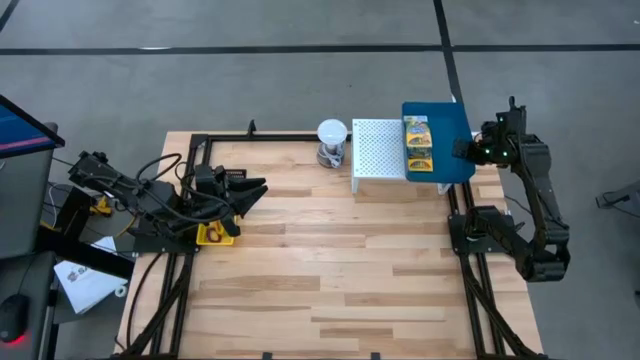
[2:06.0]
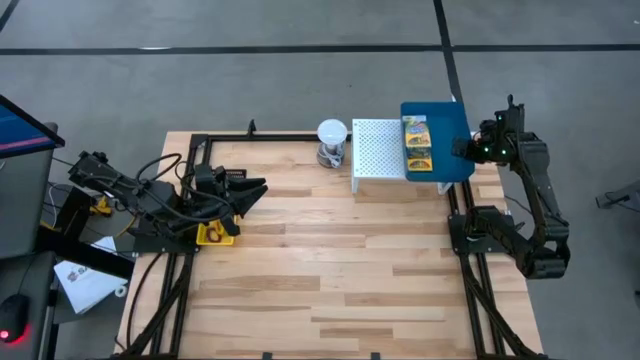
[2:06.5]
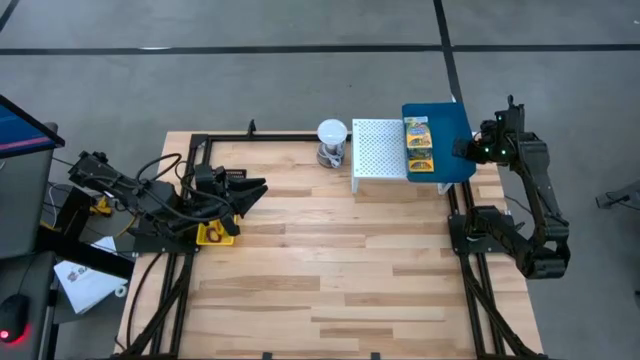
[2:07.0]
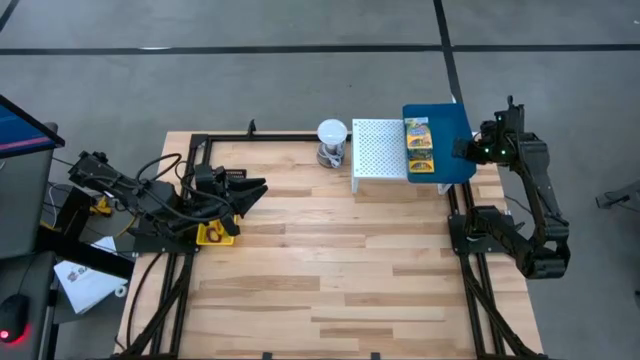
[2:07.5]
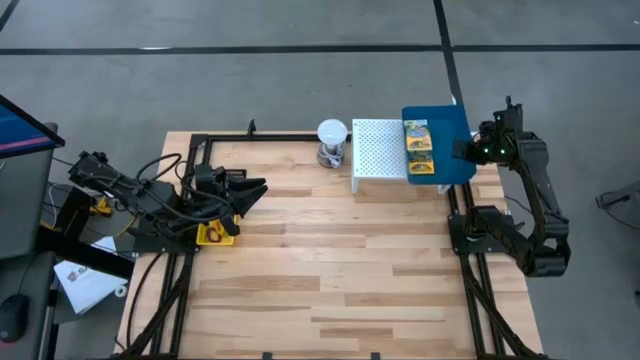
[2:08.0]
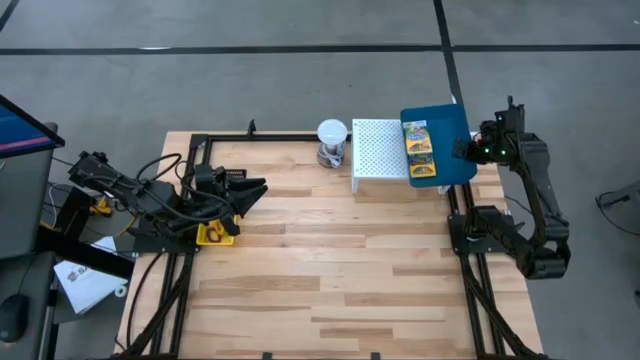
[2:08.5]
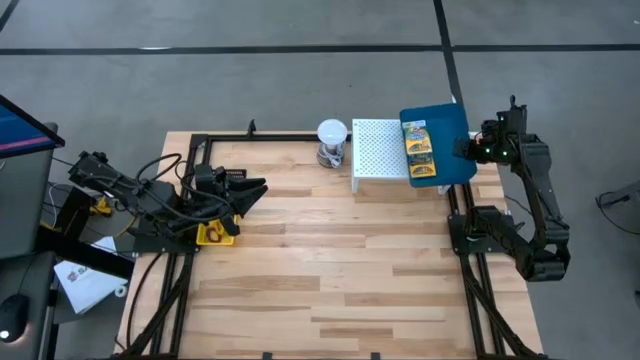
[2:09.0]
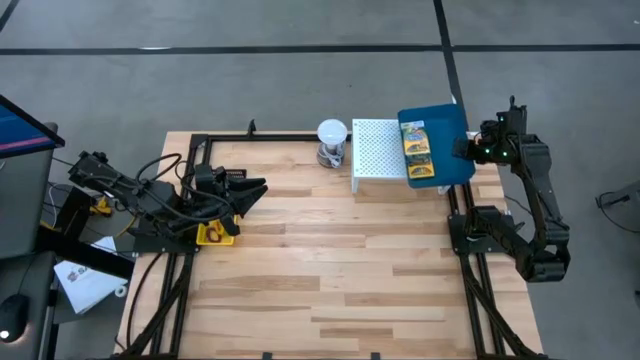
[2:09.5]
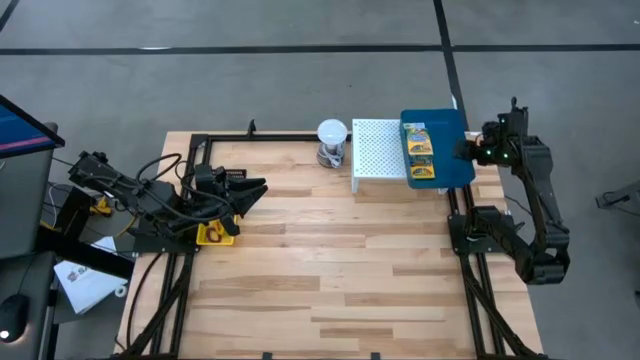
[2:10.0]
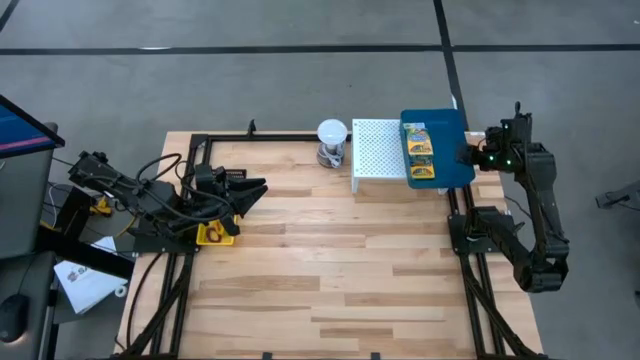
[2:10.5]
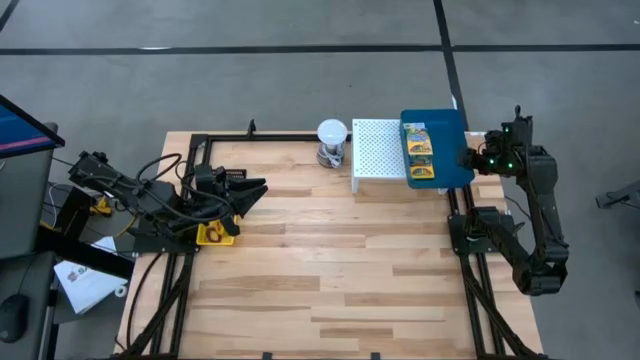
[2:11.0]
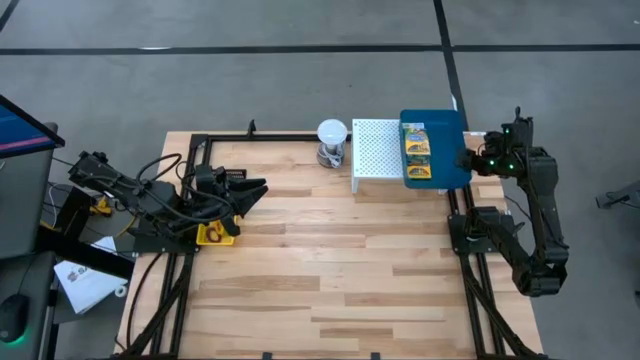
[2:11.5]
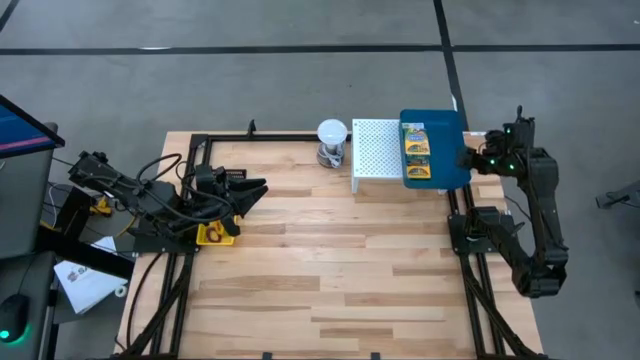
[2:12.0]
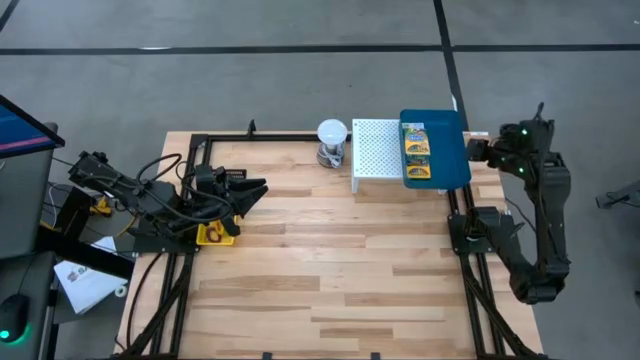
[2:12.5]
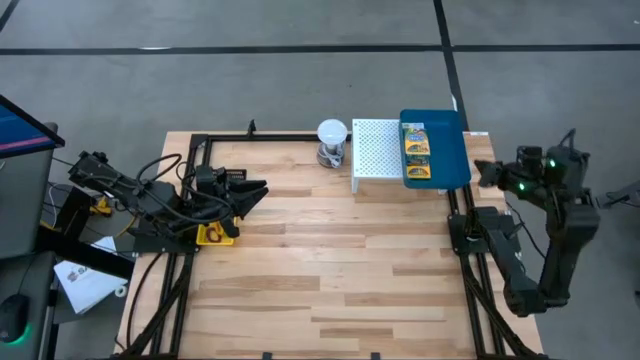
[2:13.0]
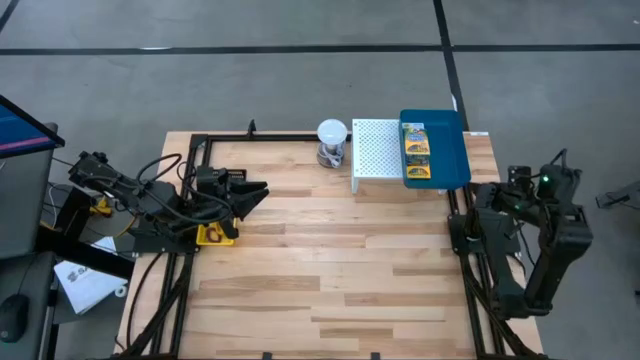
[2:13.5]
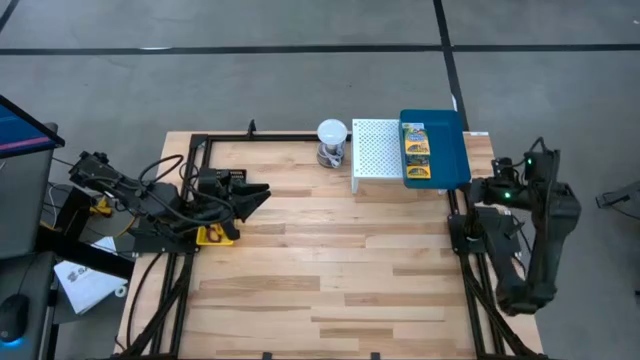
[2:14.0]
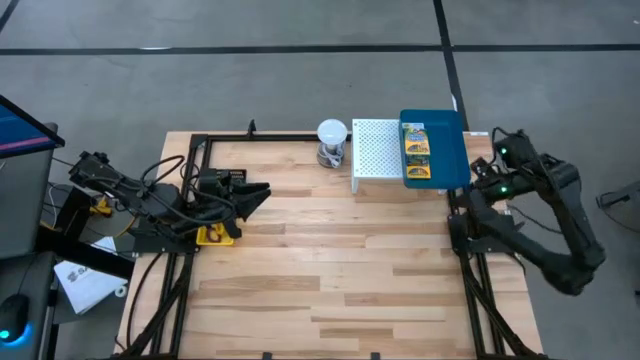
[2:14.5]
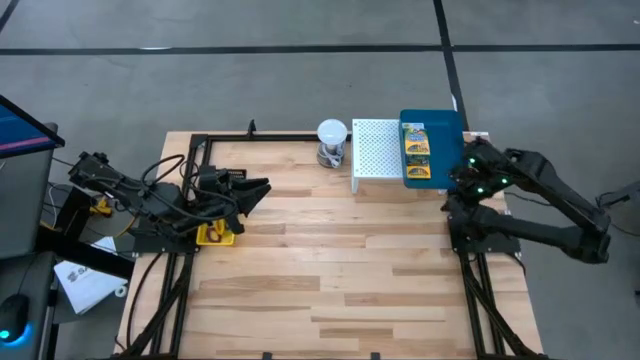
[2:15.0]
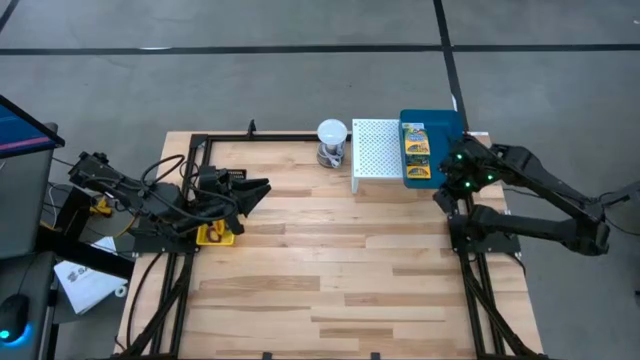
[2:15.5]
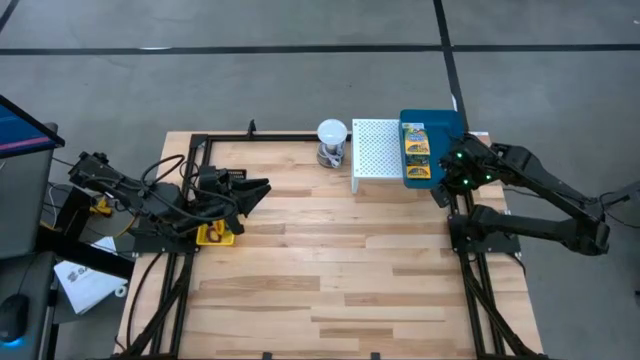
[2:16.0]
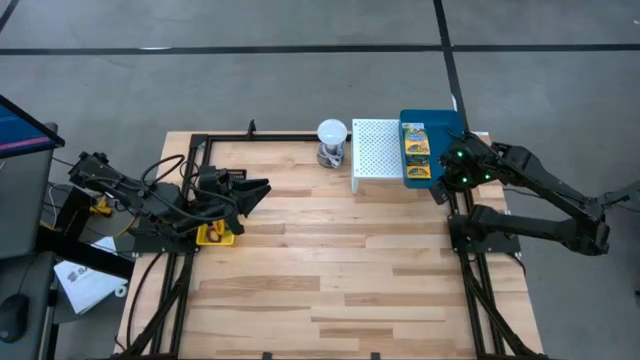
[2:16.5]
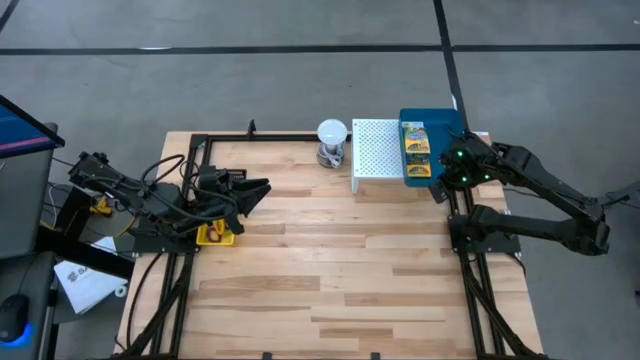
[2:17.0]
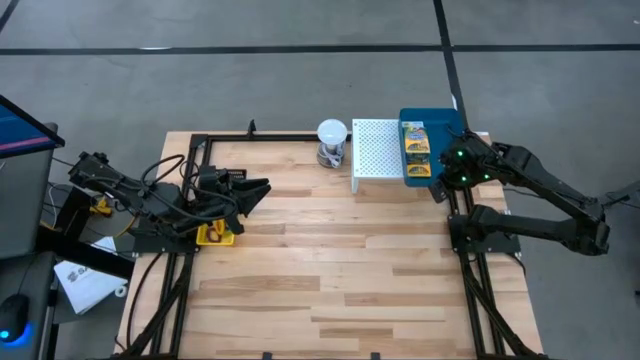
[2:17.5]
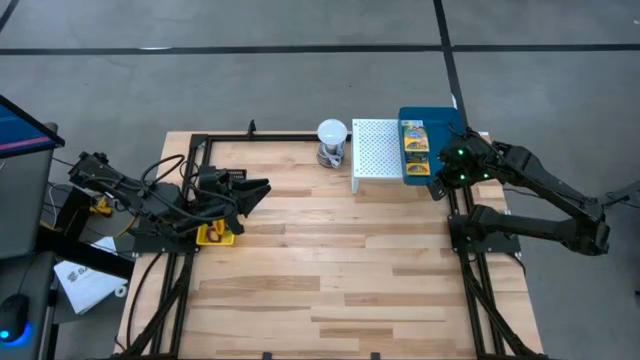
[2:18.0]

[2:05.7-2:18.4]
Task: Pick & Place Office Desk Supplies
Put the blue bin on the shelf

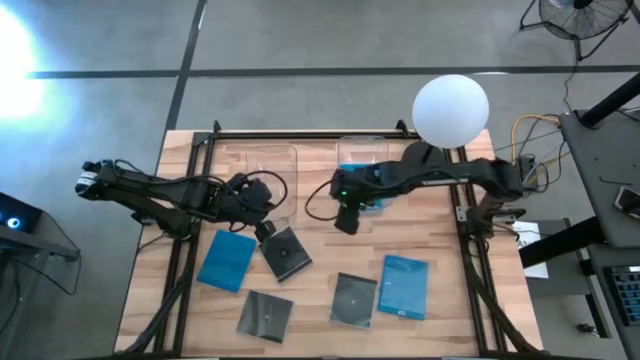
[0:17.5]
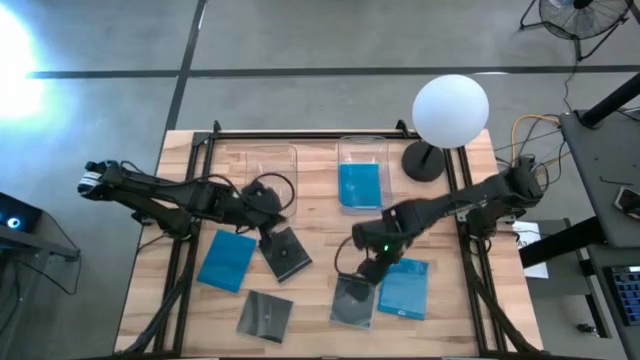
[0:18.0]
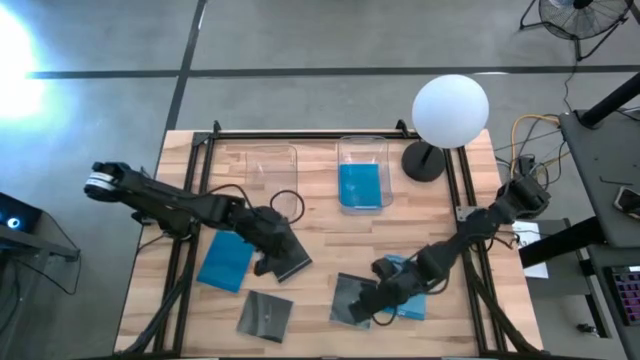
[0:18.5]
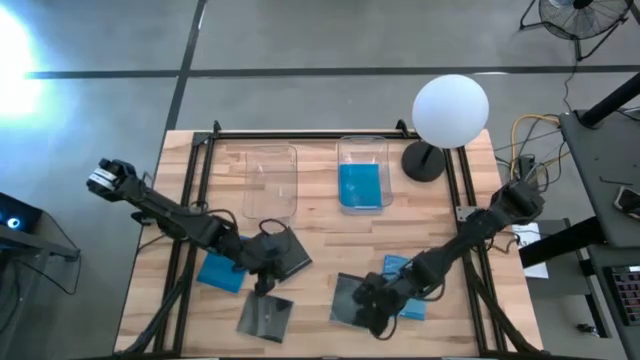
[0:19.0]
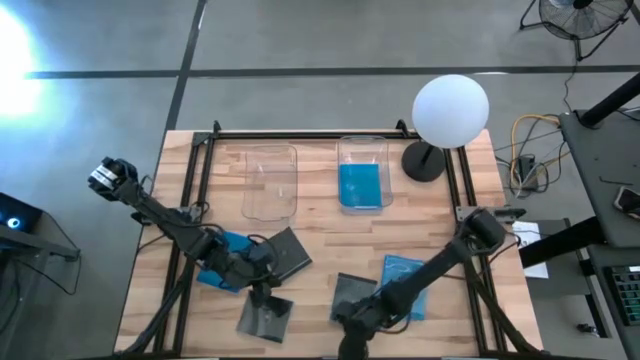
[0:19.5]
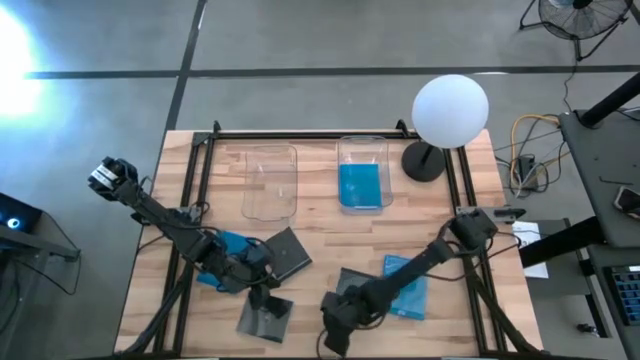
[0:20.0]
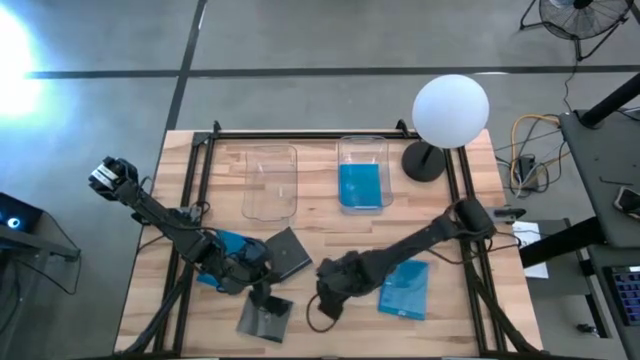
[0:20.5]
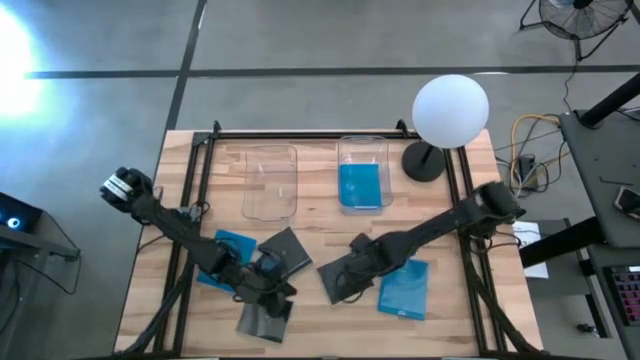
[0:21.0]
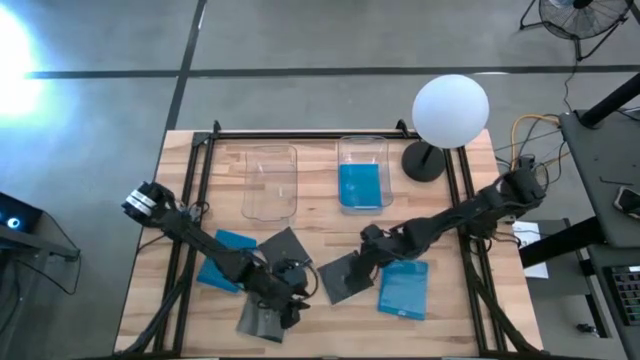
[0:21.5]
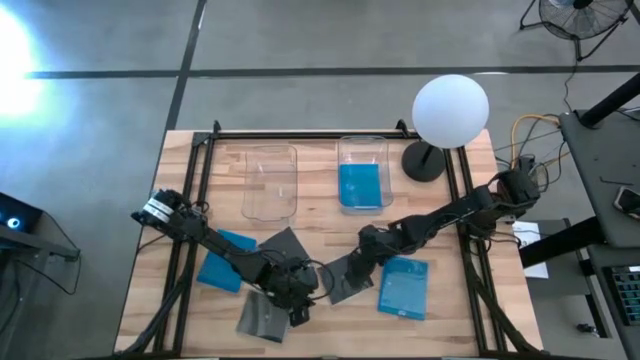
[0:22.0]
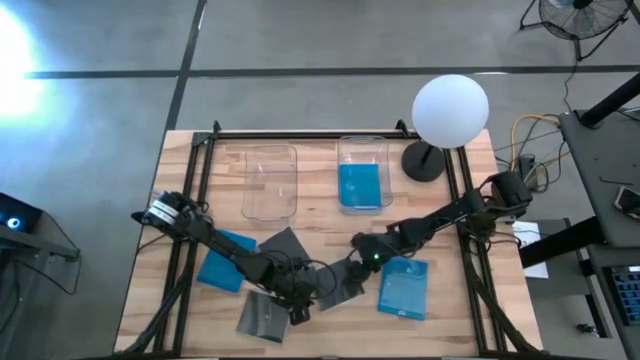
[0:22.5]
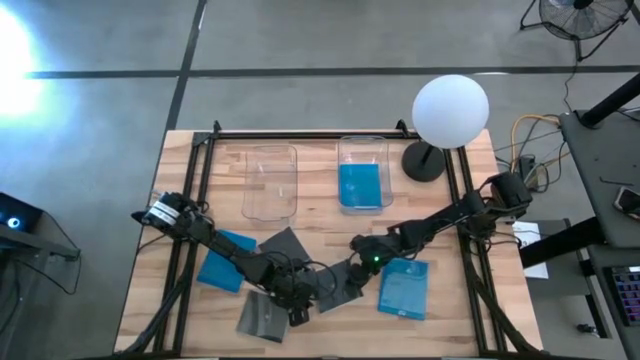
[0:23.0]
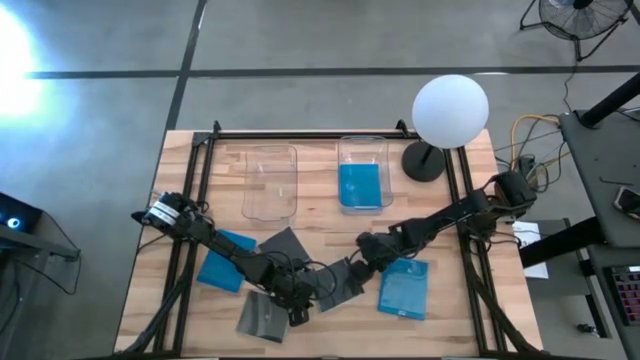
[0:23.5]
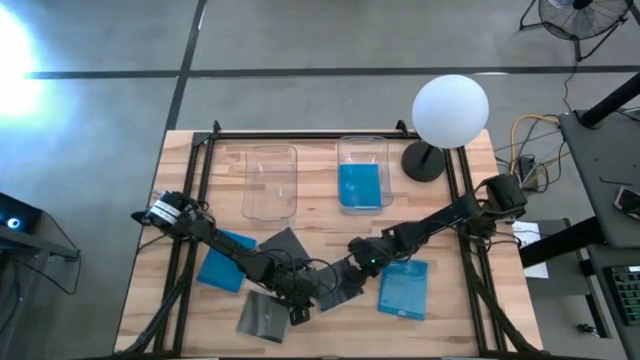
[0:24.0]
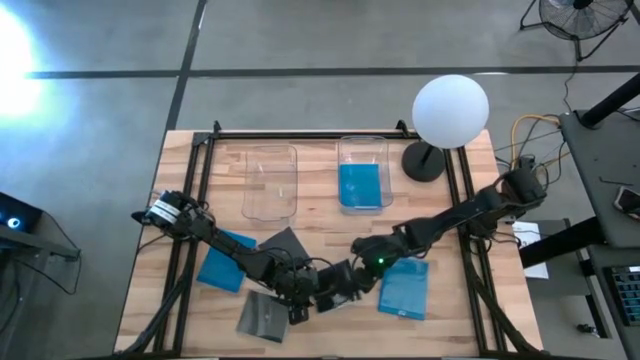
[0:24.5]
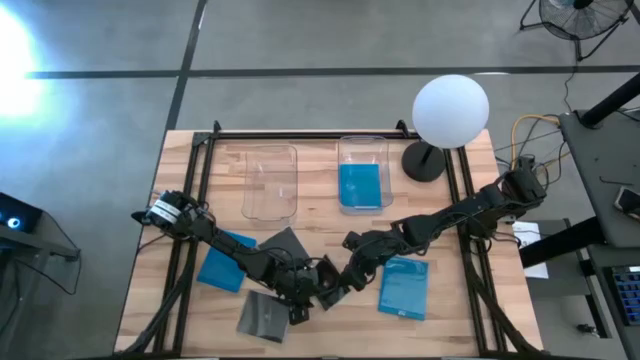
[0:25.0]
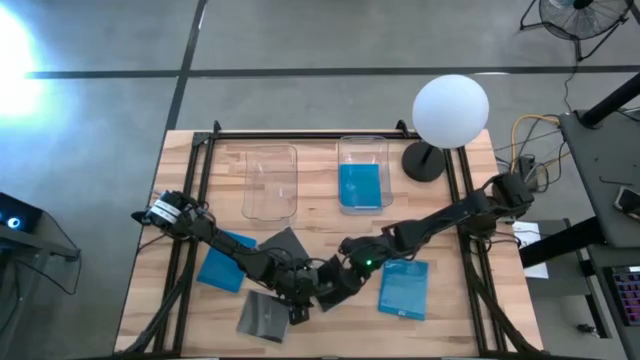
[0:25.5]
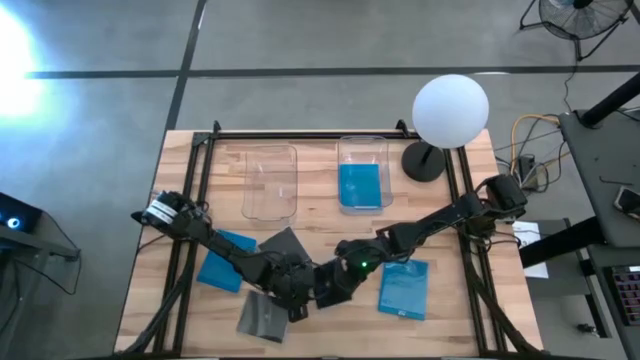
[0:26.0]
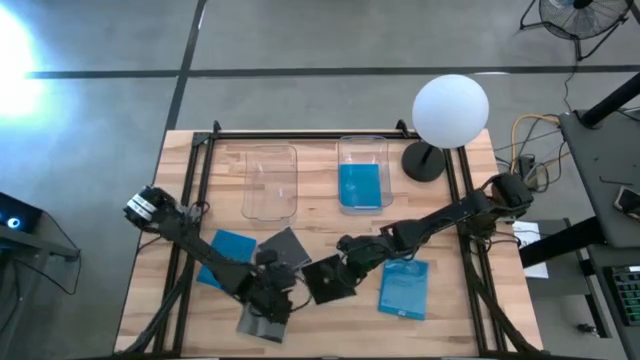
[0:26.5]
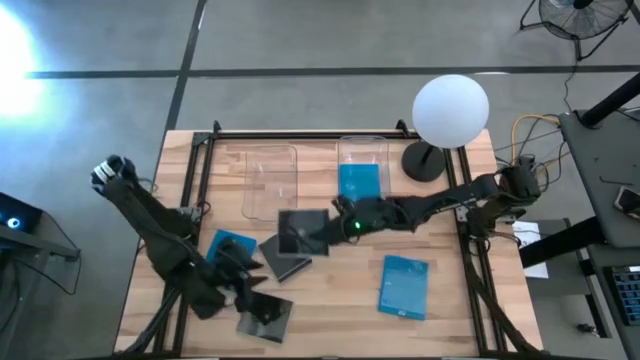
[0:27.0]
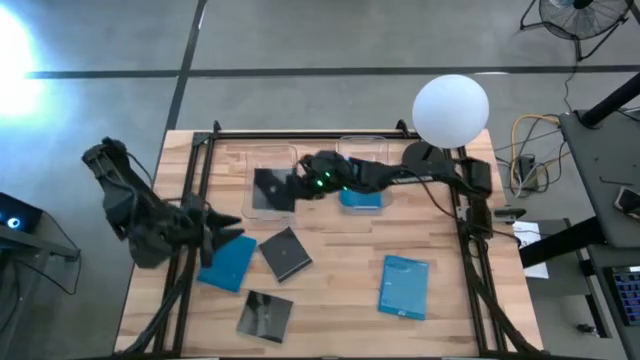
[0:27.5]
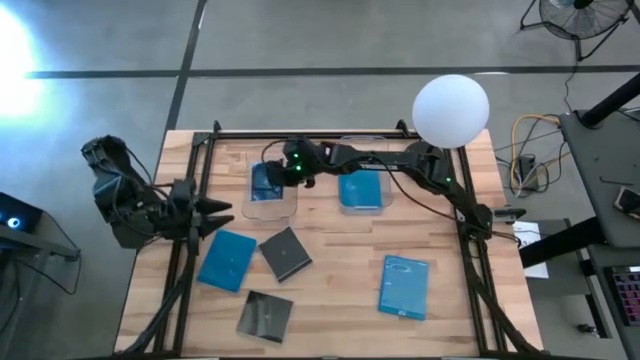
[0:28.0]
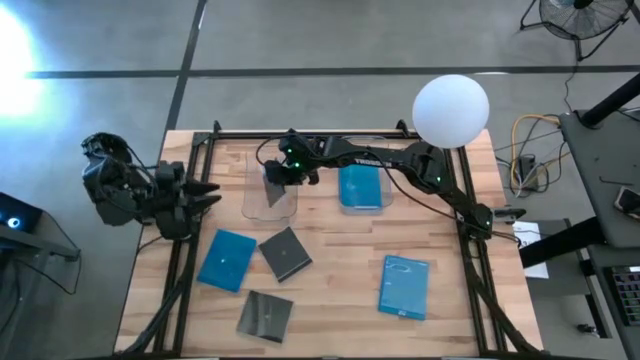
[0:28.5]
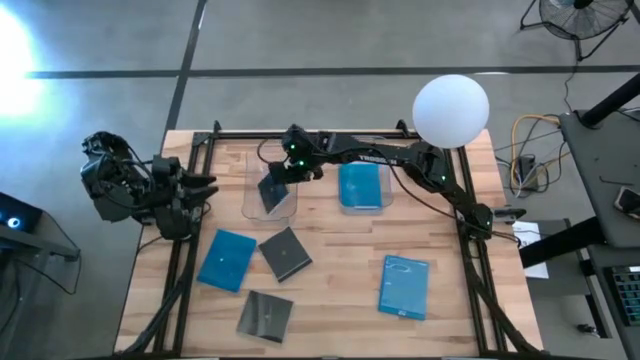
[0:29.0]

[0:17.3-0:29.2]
Task: Pick & place jewel cases by type
Put the bottom right CD case into the left transparent bin
